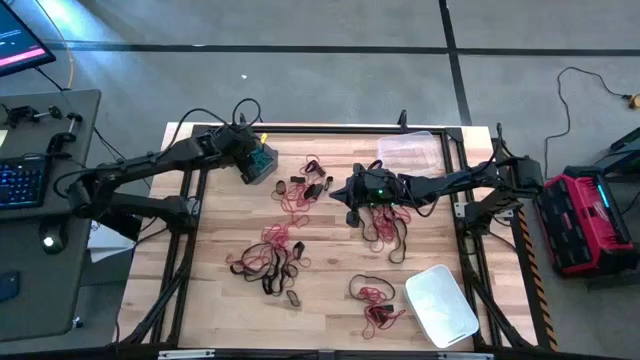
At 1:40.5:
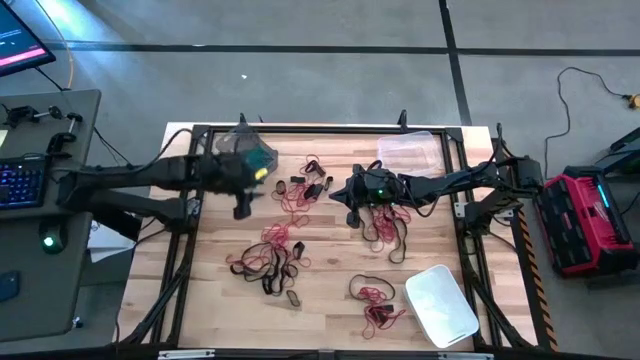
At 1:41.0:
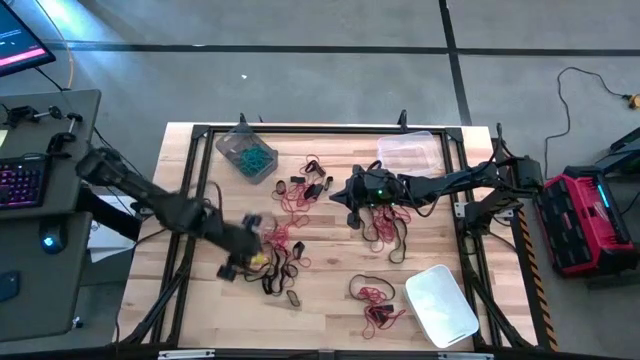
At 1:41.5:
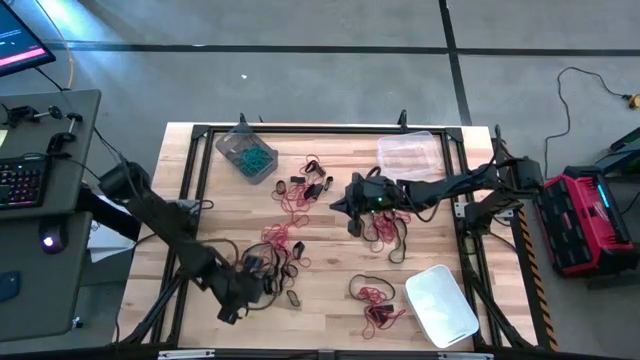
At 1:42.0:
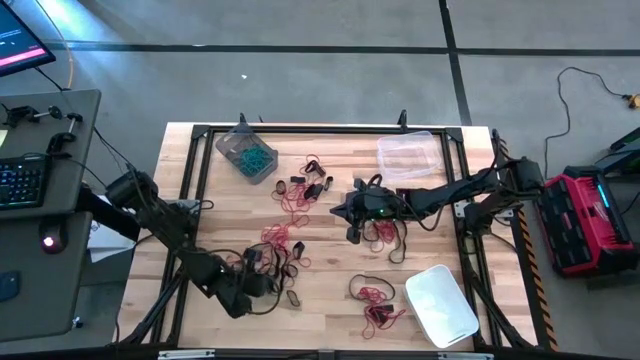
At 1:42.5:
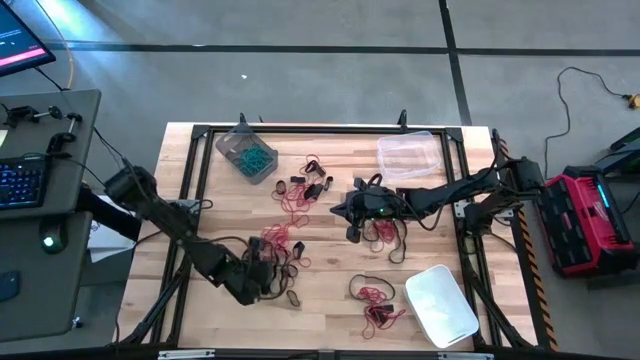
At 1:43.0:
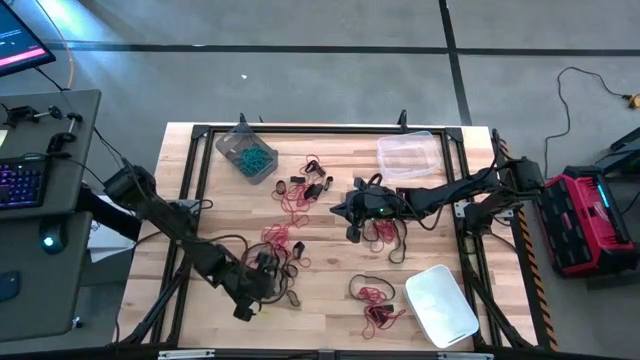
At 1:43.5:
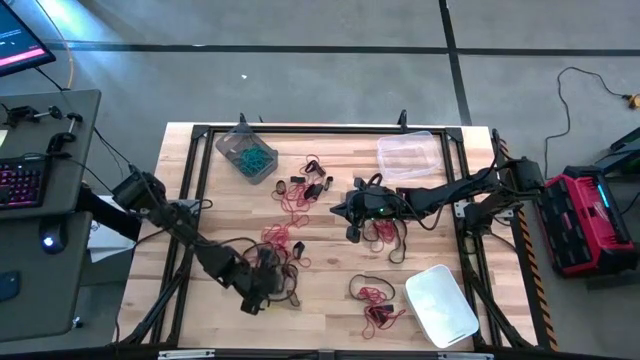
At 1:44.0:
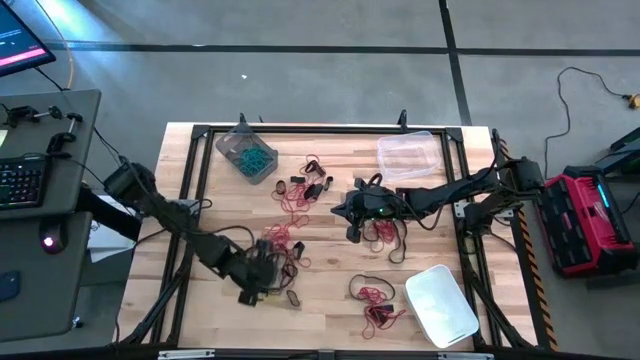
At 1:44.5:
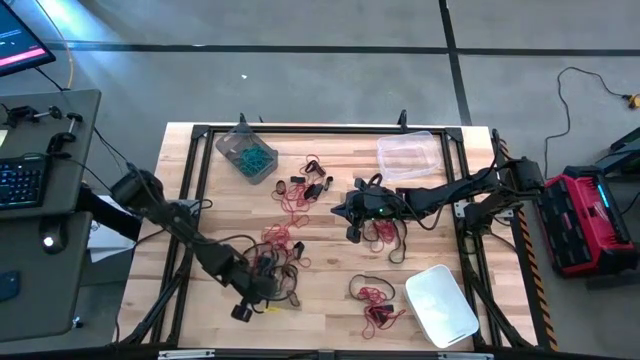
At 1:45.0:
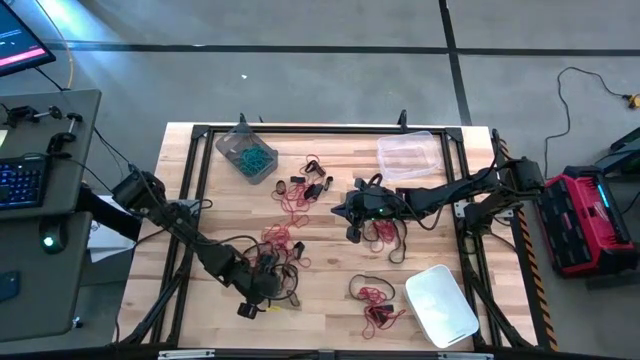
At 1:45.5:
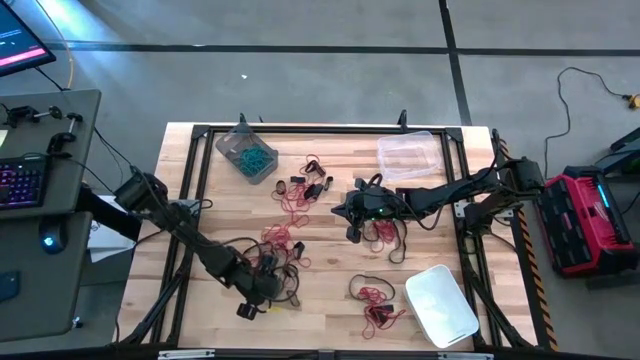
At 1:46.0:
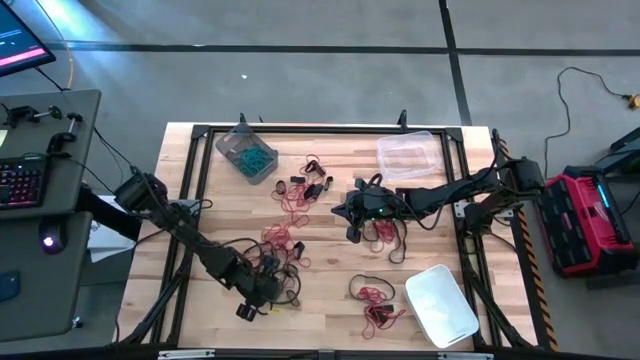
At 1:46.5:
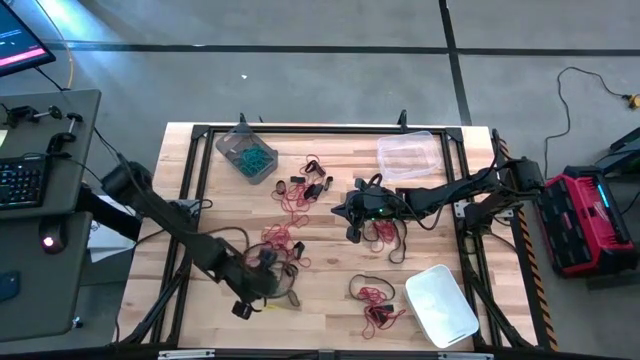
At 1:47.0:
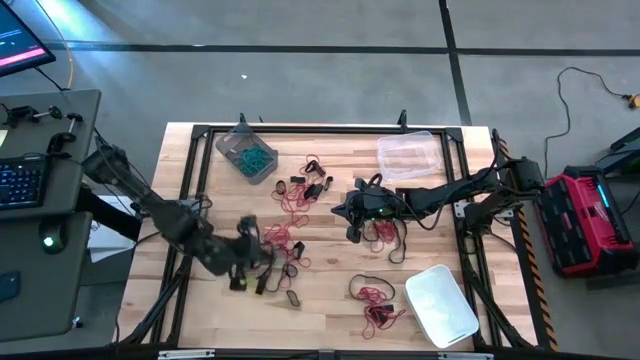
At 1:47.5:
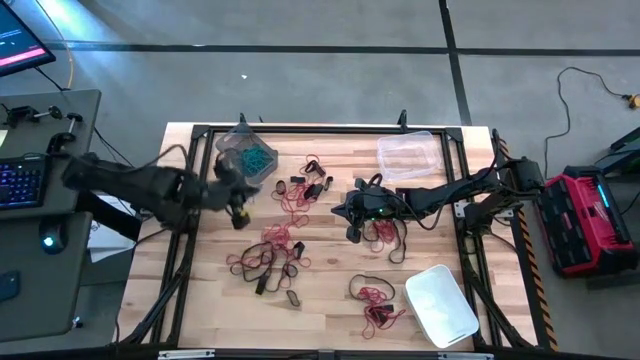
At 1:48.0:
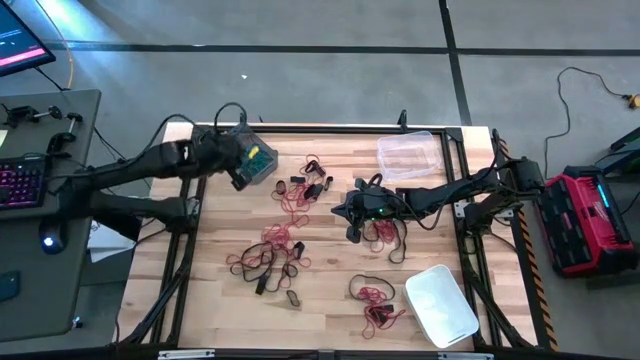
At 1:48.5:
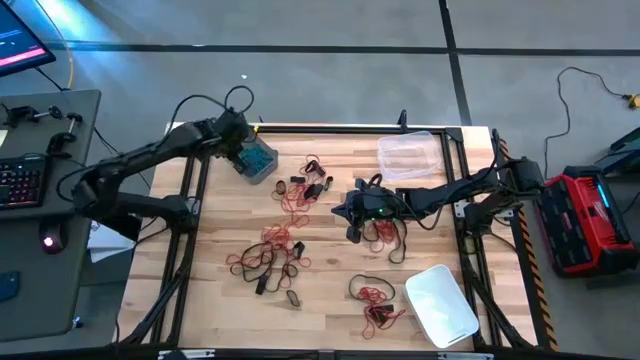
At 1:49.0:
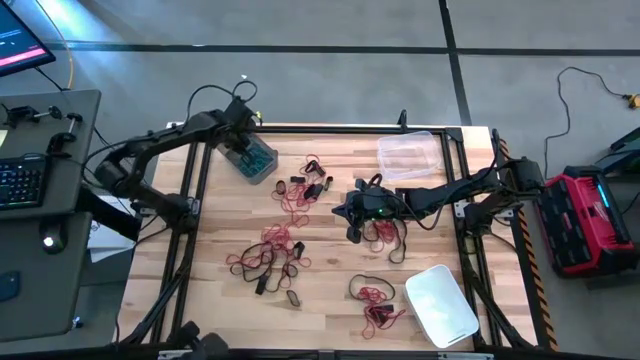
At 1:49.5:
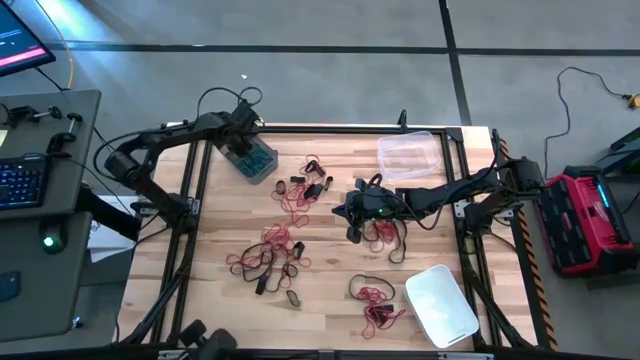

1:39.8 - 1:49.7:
Task: Sort rubber bands into baskets
Put the blue rubber band into the black bin

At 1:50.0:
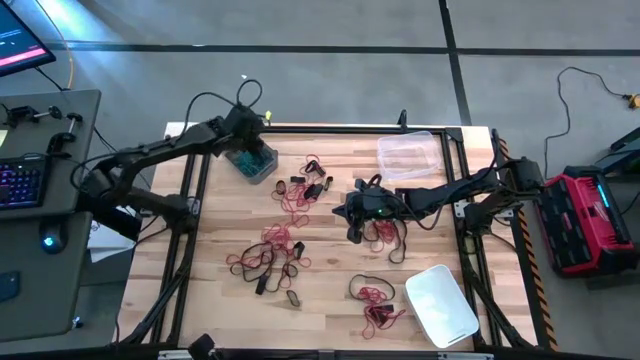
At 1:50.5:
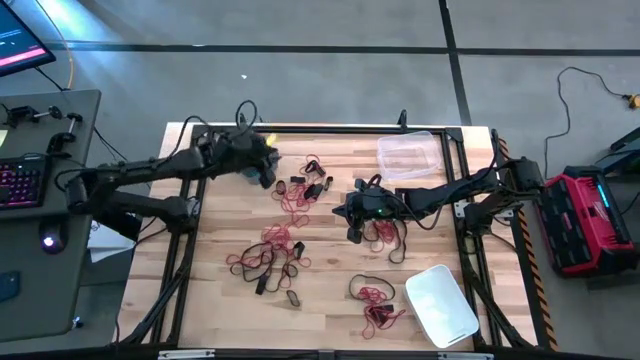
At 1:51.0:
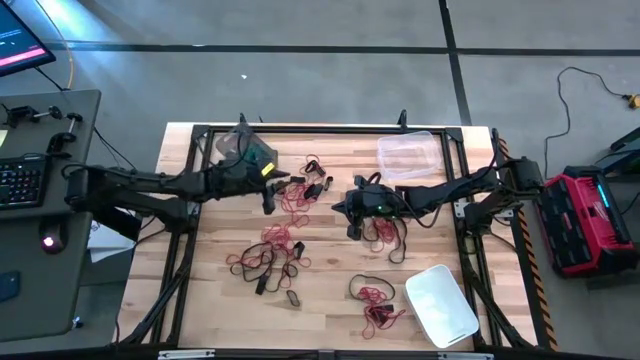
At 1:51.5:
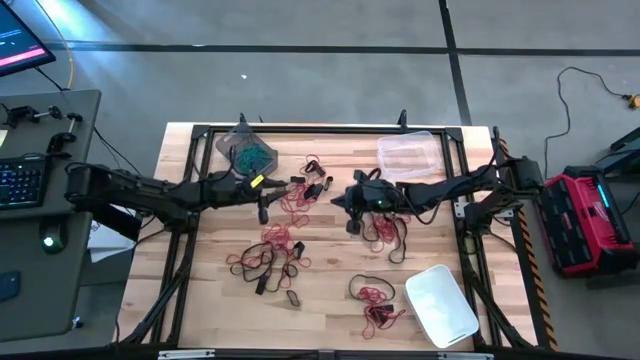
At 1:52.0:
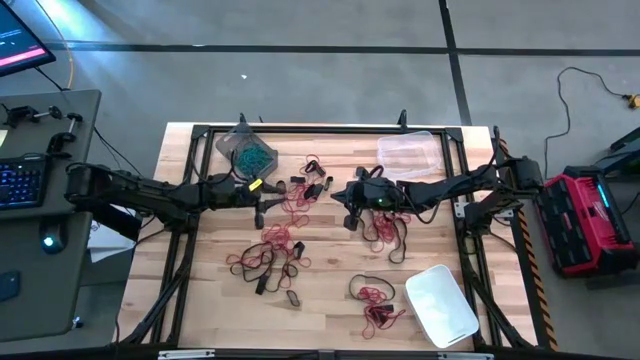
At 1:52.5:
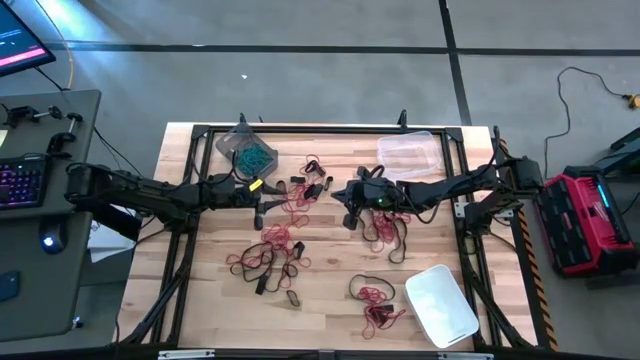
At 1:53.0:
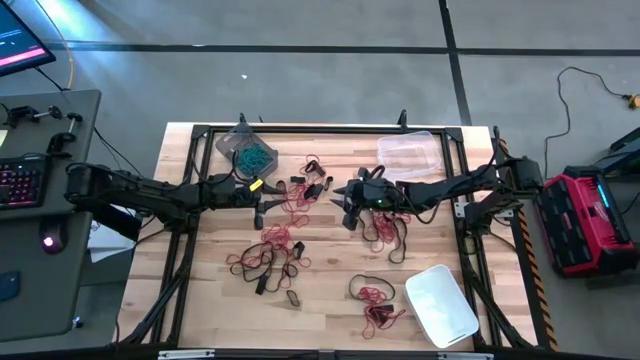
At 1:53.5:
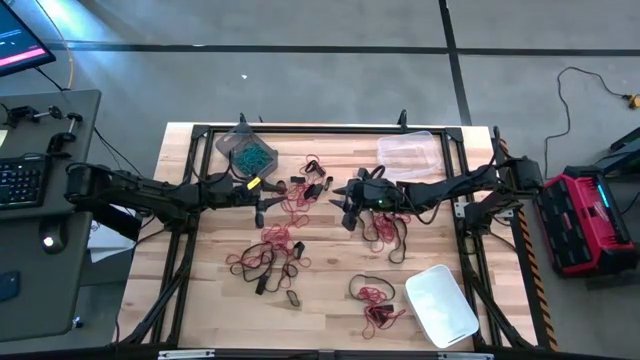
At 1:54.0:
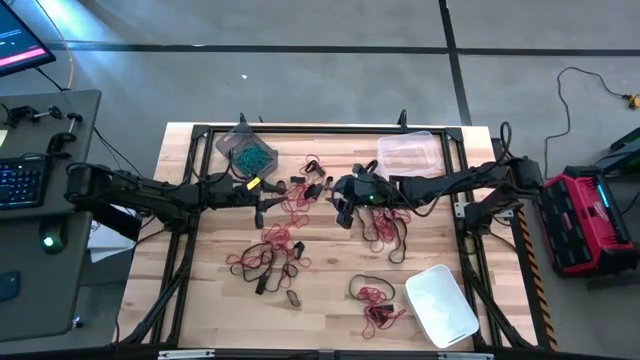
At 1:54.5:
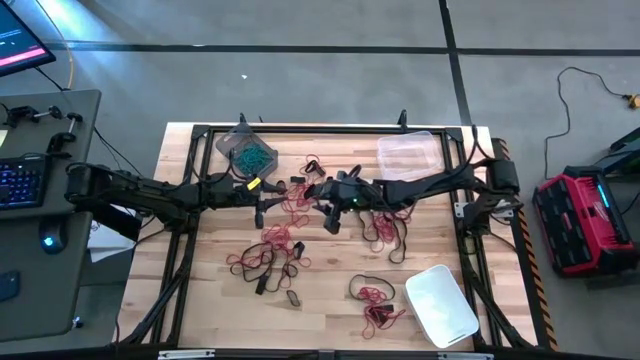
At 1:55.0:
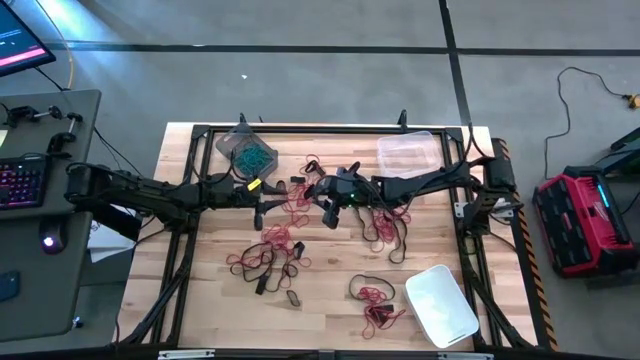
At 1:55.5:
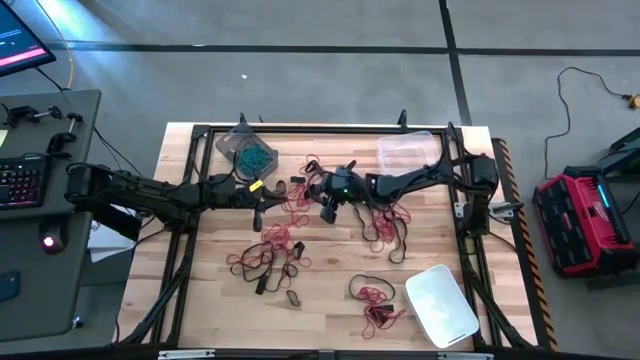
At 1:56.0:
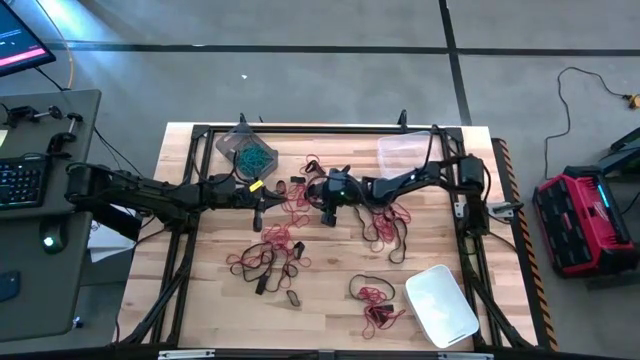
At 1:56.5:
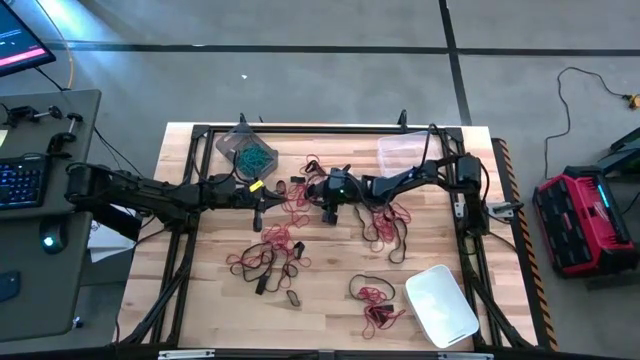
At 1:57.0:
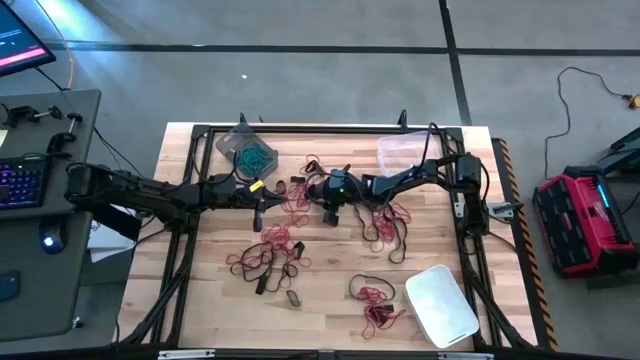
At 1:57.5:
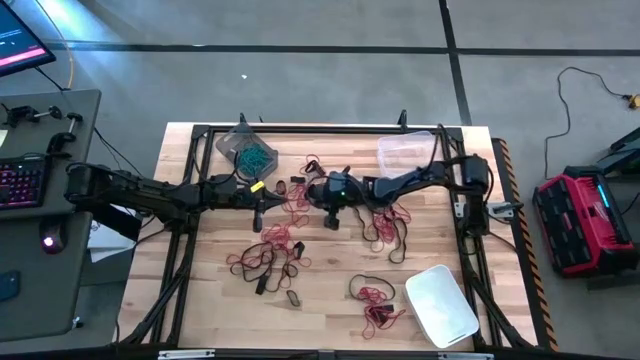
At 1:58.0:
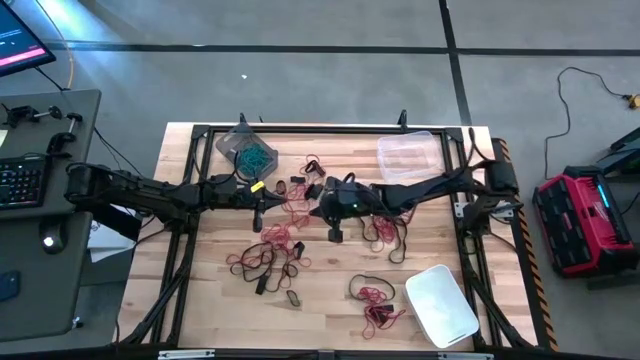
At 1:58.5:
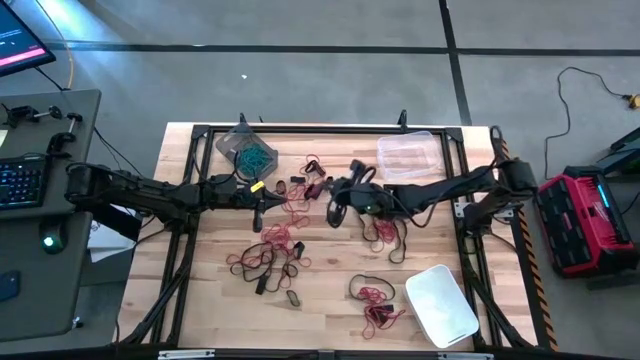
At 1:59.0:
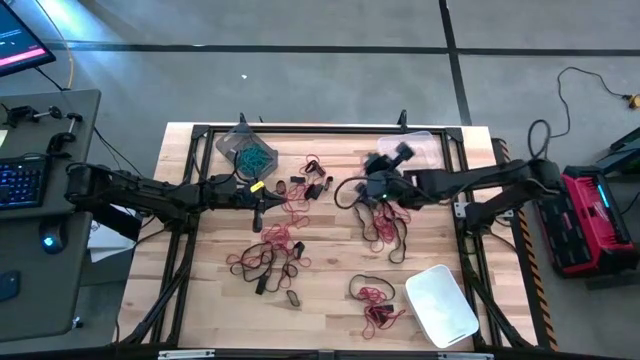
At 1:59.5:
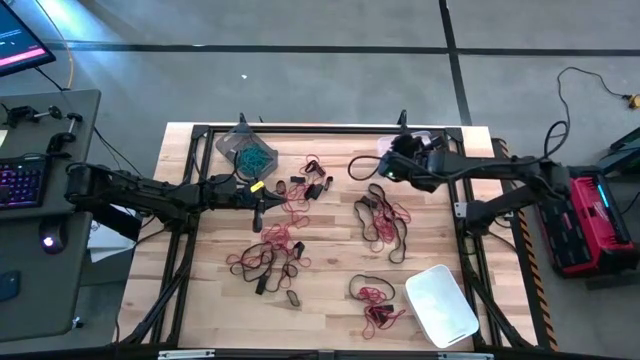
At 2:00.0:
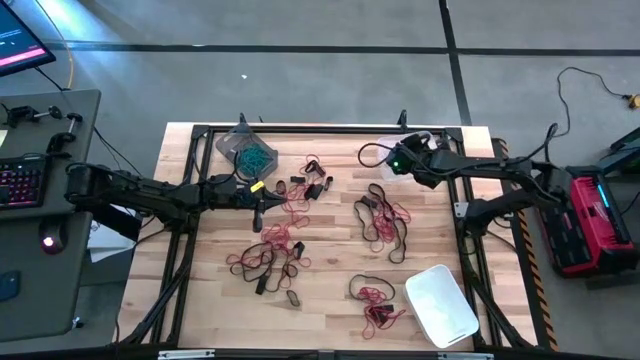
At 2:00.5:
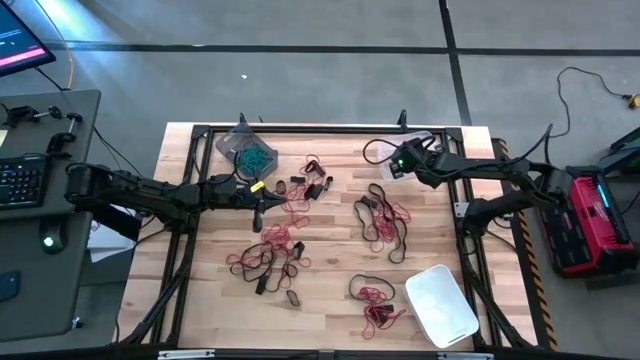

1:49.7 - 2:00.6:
Put the red rubber band into the transparent bin

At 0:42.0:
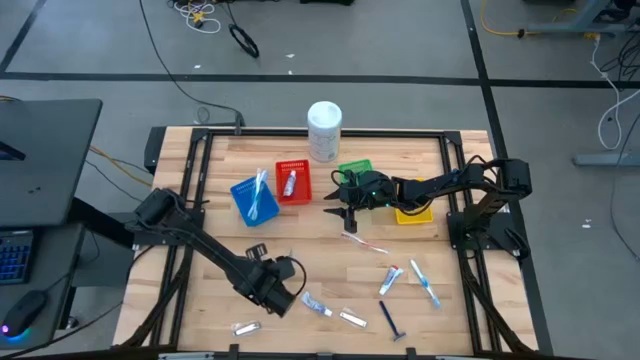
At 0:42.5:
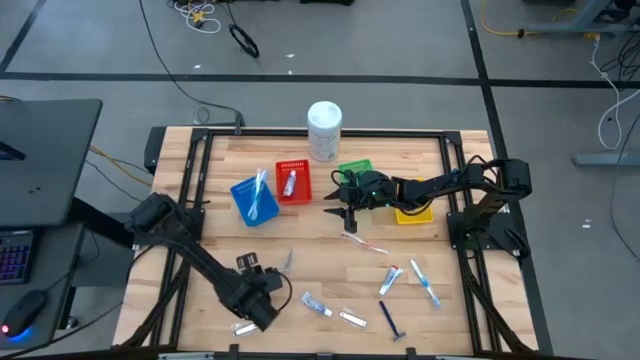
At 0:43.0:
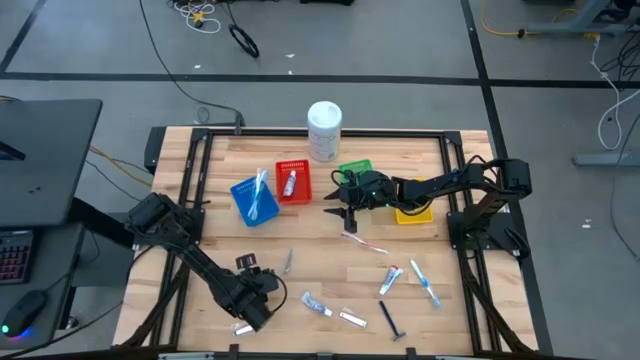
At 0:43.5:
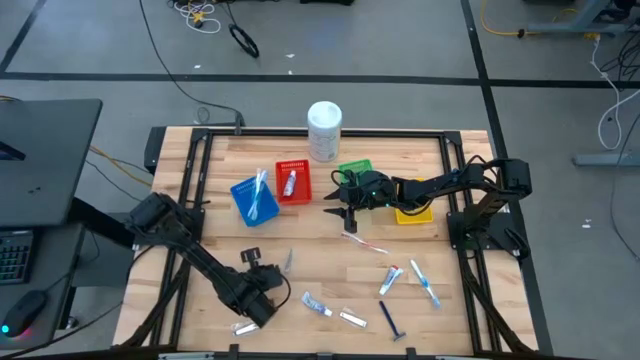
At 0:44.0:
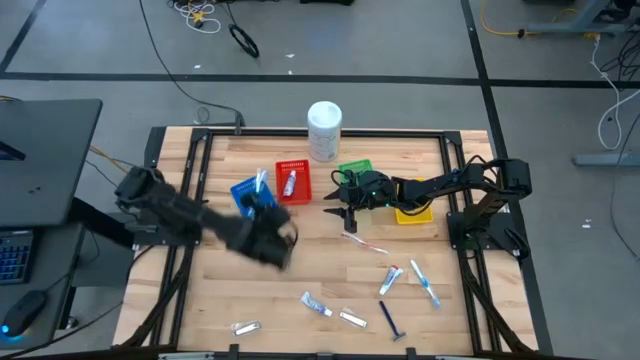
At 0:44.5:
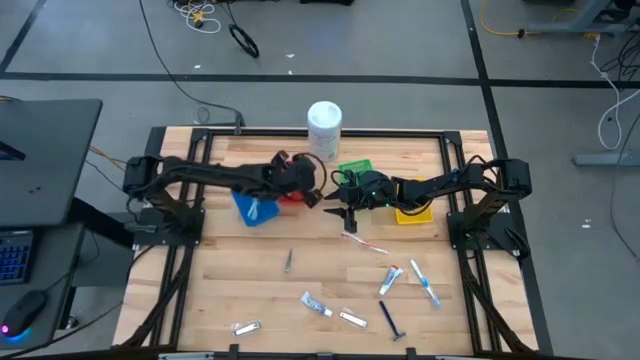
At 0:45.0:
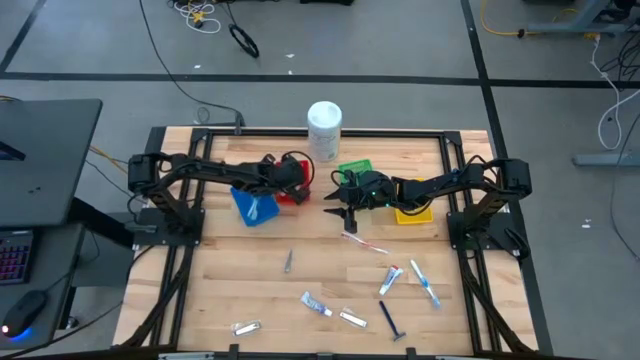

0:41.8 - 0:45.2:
Task: Pick & Place Travel size toiletries
Put the white toothpaste into the red bin
